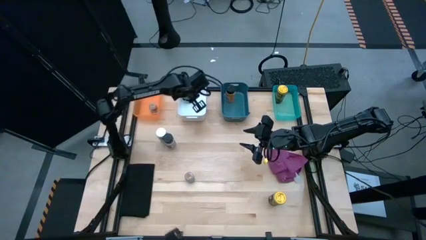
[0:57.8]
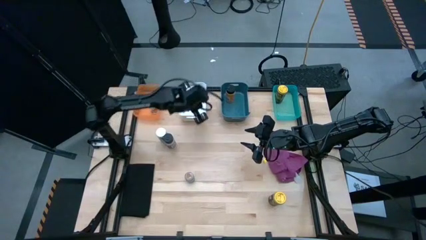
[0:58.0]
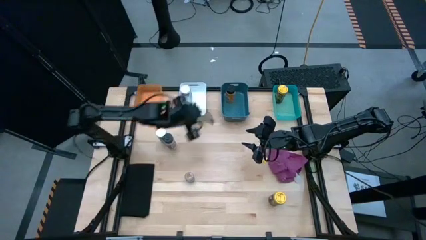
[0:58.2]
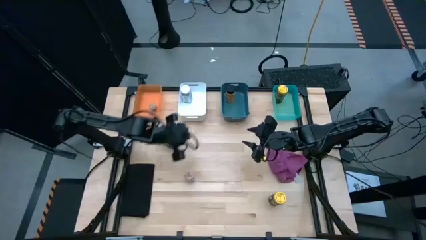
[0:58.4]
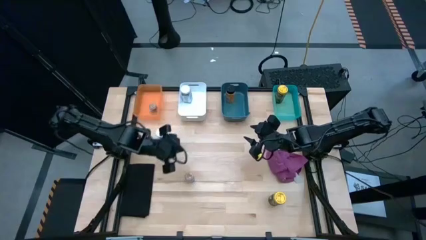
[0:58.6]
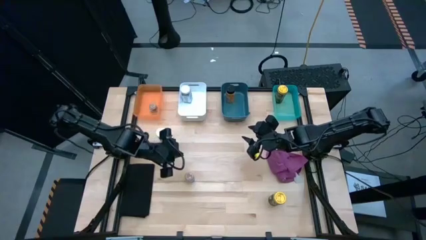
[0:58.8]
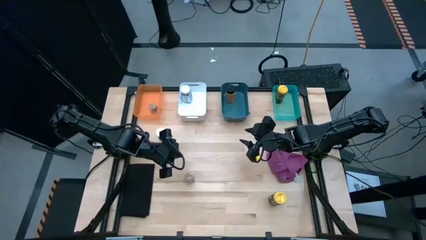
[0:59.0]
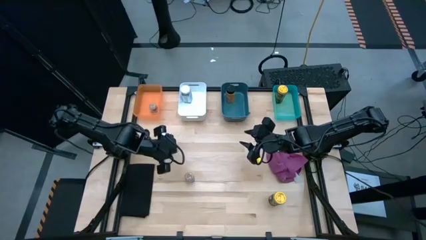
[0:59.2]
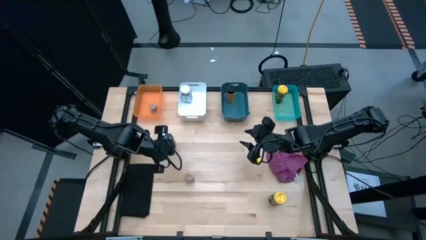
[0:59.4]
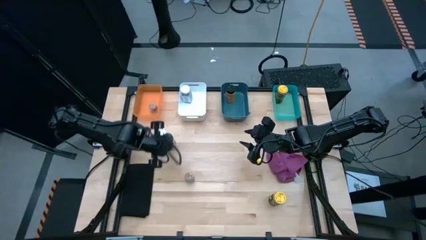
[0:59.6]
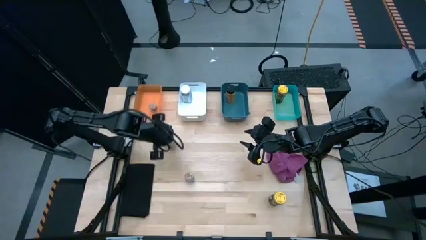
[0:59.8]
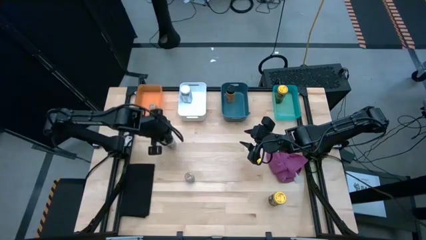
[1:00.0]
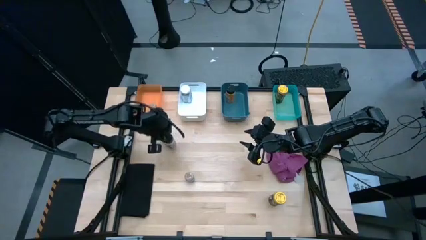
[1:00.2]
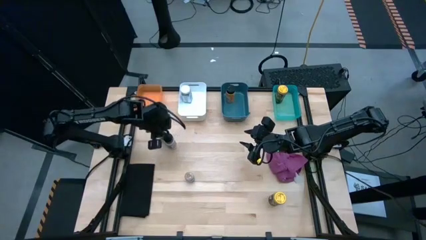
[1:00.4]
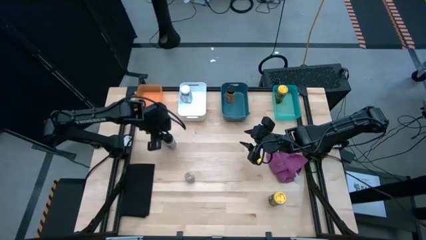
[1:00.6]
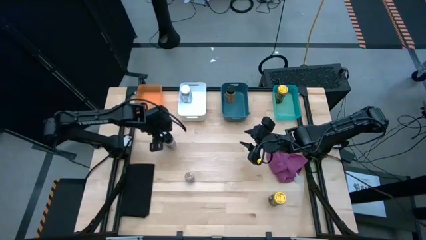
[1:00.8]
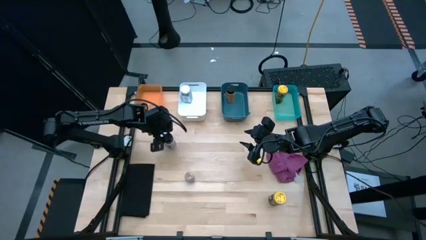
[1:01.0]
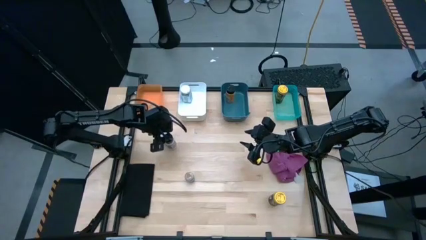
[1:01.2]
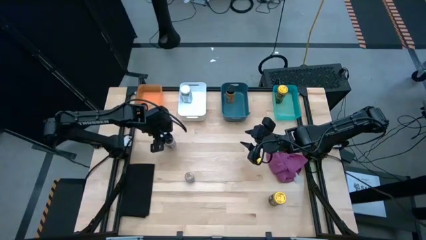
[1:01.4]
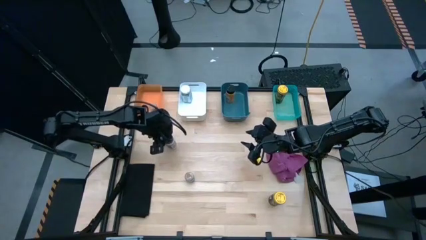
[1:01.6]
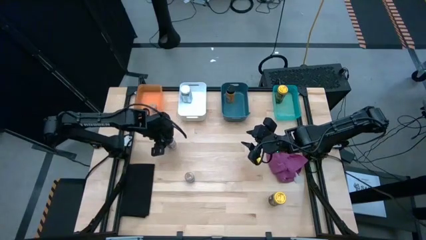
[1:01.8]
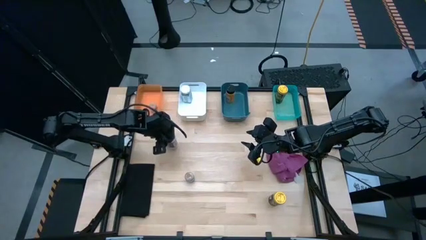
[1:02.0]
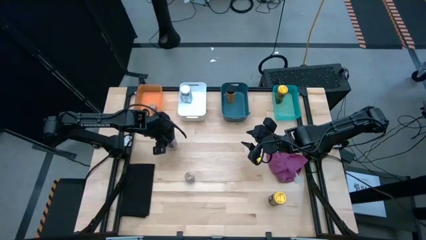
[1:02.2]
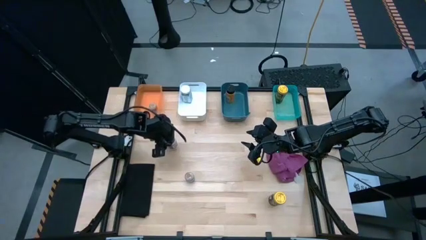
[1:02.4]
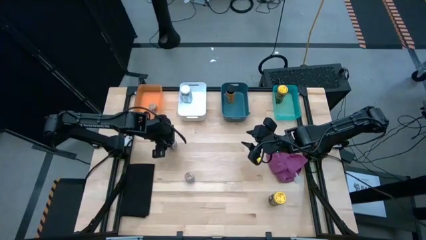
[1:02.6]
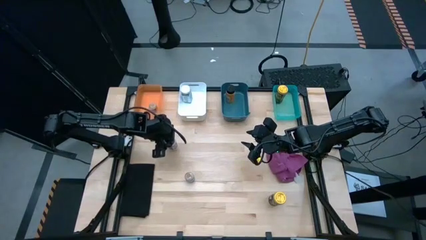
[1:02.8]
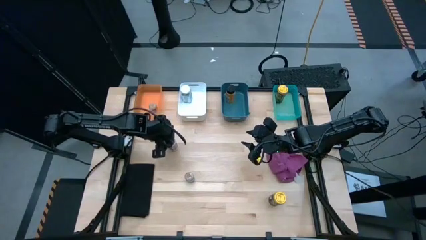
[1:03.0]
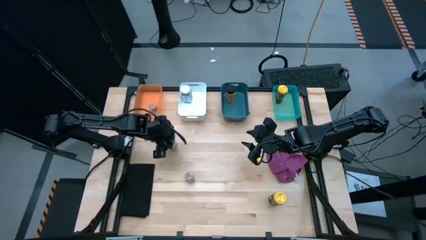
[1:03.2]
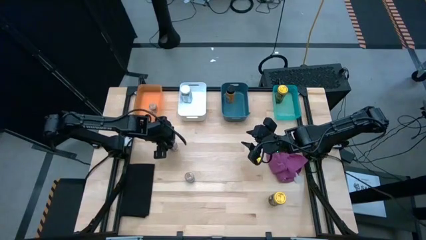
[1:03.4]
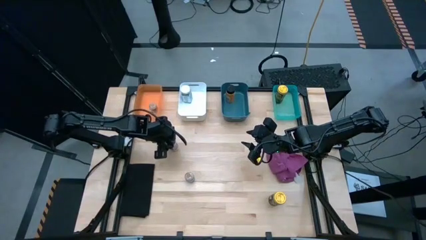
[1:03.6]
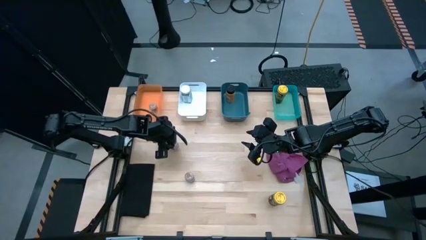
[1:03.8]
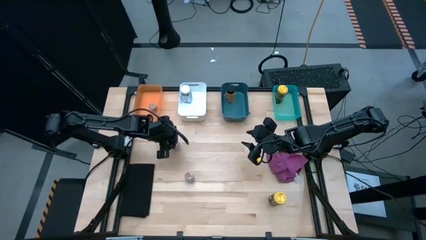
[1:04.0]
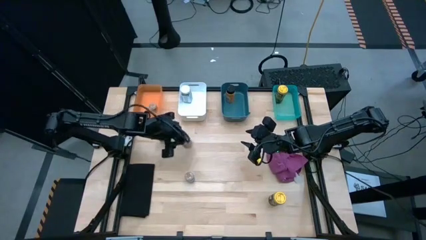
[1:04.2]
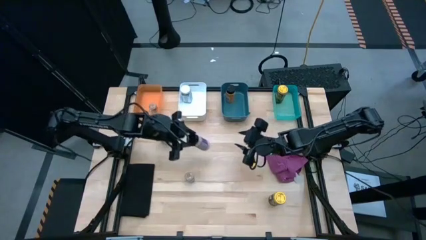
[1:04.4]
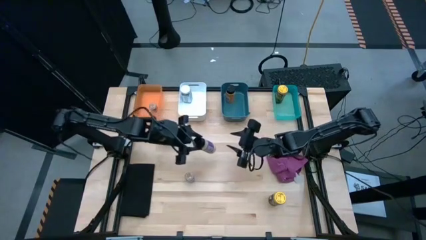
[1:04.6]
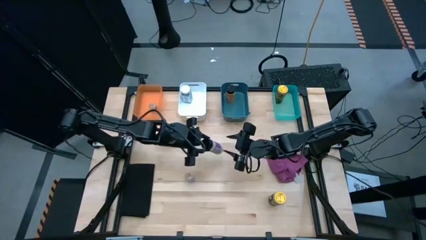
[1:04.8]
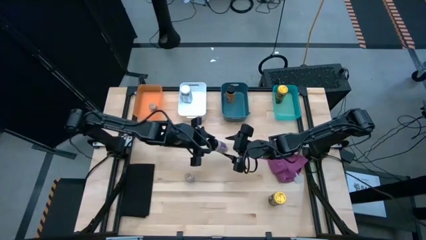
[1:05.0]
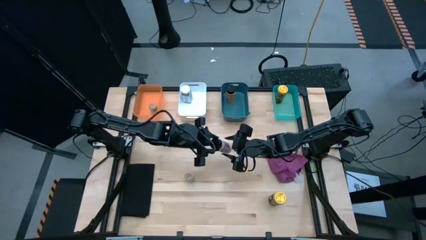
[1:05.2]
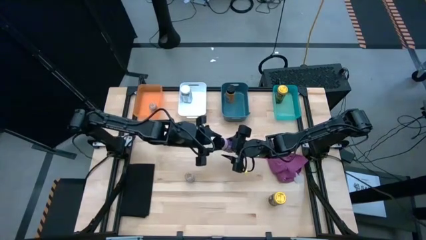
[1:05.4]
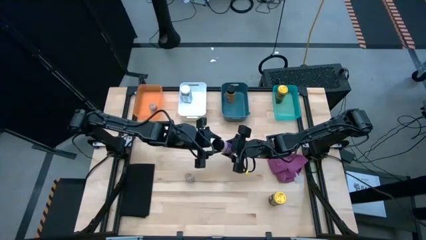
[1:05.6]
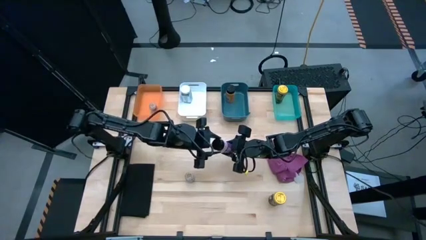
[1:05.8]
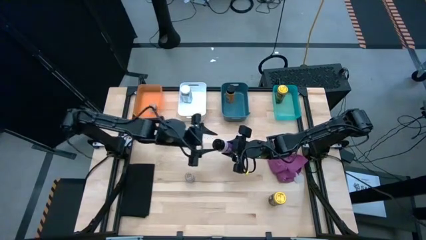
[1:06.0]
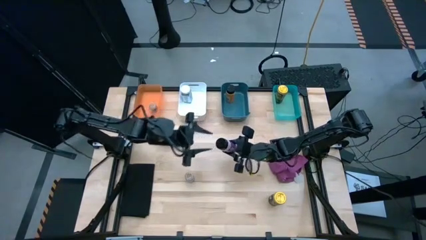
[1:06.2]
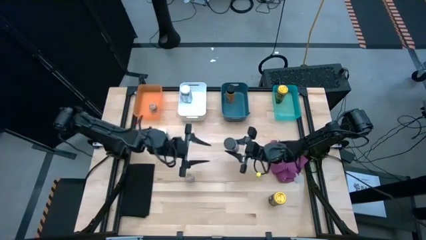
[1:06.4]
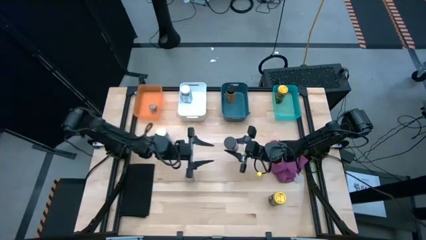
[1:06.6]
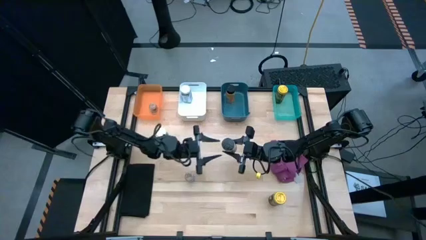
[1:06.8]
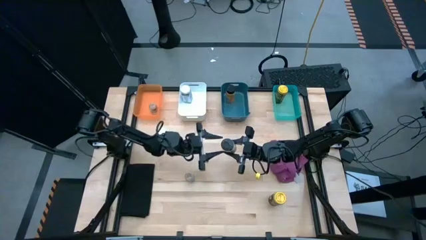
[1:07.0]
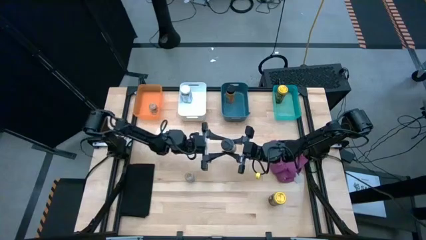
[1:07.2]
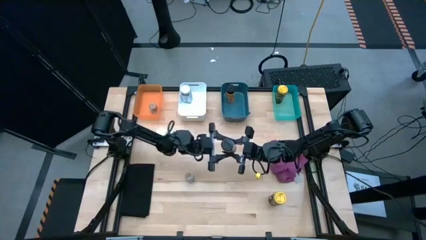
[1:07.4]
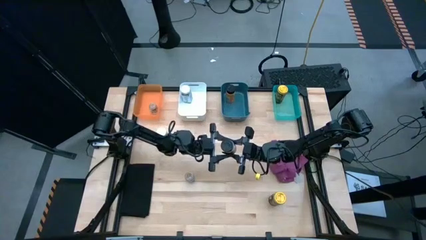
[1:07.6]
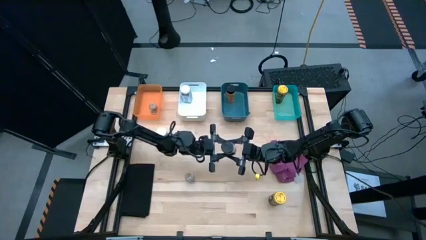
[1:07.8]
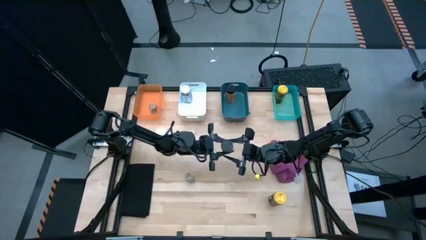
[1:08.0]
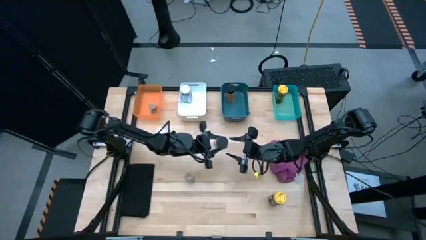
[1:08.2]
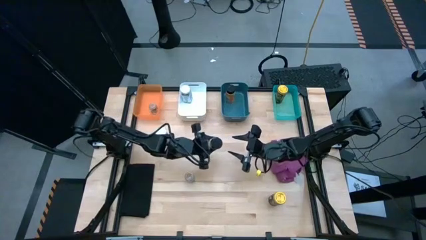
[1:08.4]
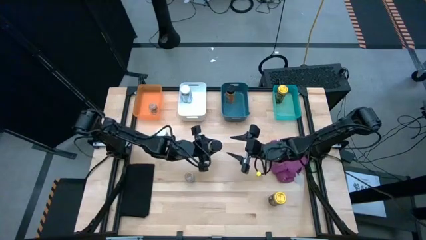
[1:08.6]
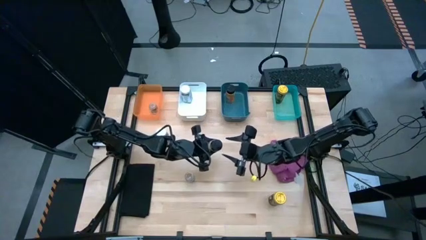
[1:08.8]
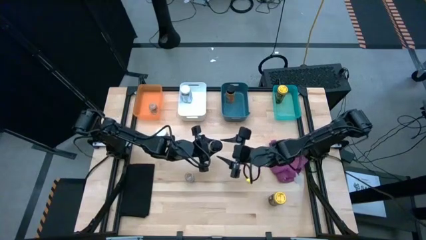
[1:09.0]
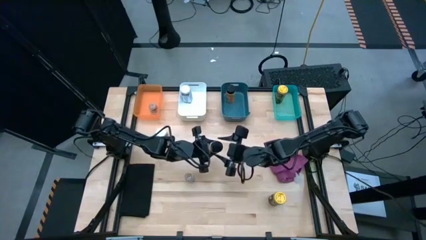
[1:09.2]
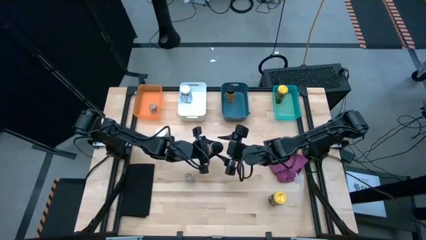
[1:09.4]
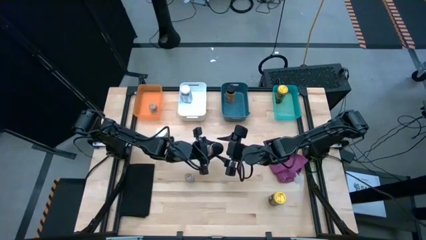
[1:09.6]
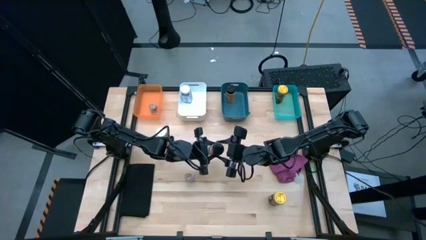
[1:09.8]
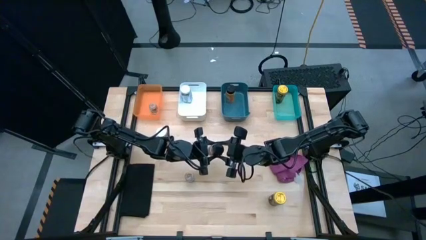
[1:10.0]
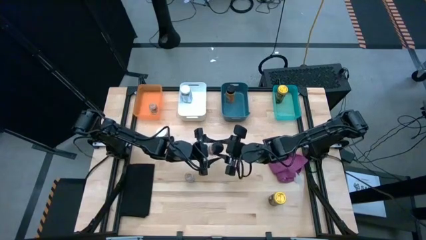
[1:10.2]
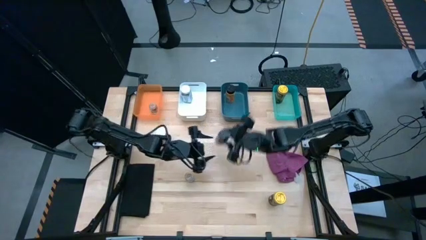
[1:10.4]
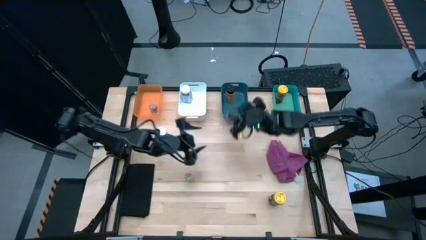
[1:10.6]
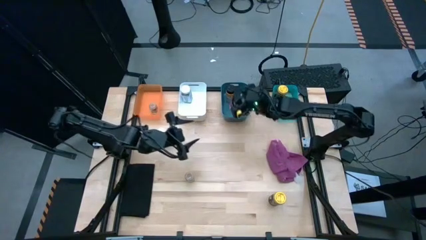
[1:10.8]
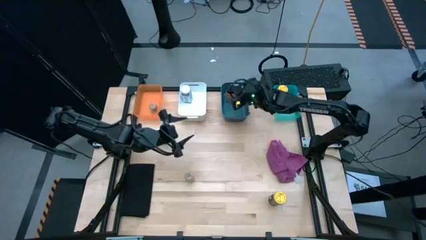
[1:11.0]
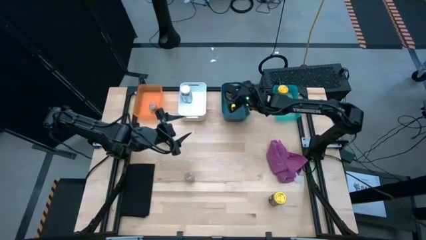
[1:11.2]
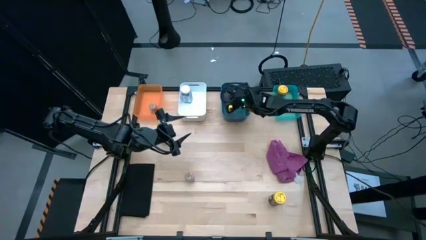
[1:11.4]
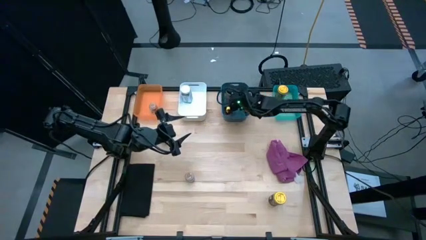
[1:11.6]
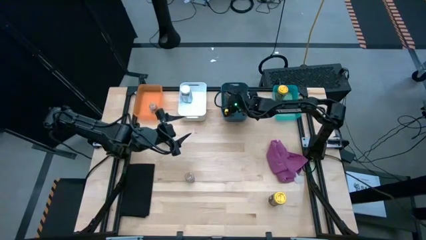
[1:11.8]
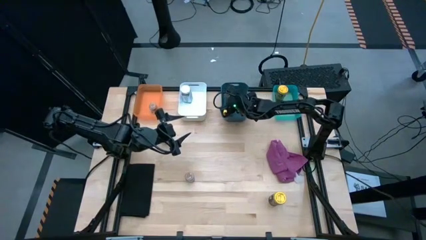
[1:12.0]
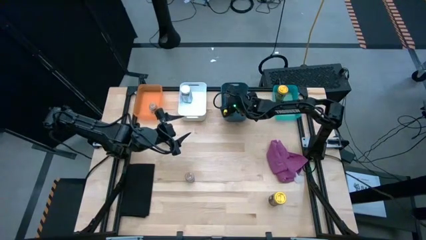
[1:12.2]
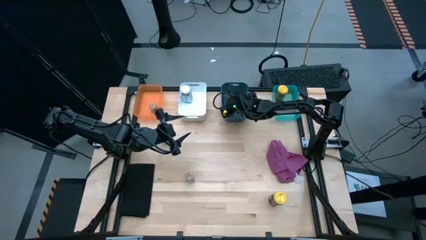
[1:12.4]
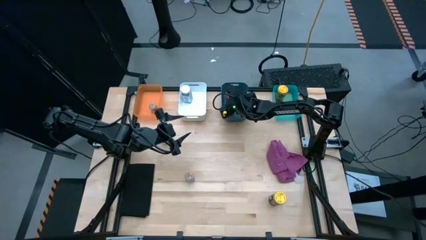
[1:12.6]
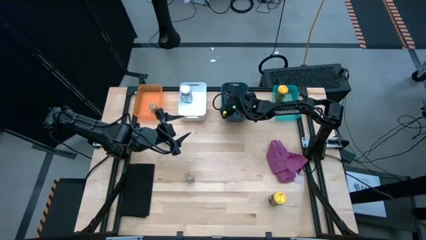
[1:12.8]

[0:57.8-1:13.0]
Task: Sort spices by type
Put the black seasoning bottle into the green bin
